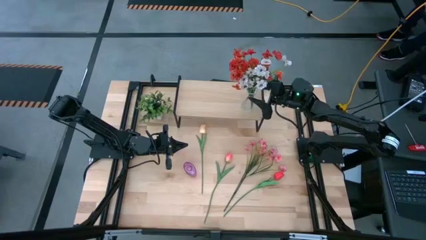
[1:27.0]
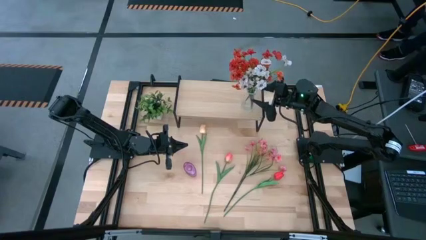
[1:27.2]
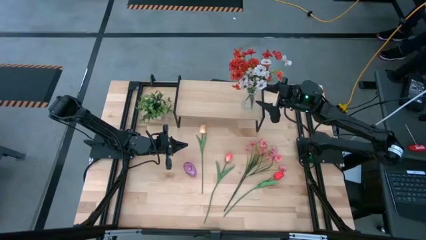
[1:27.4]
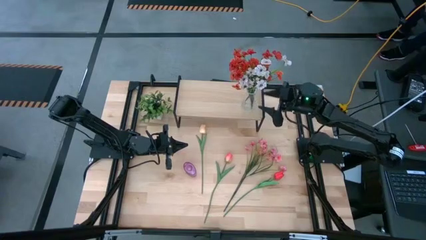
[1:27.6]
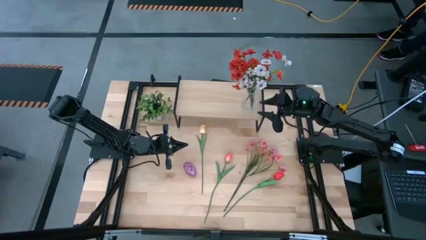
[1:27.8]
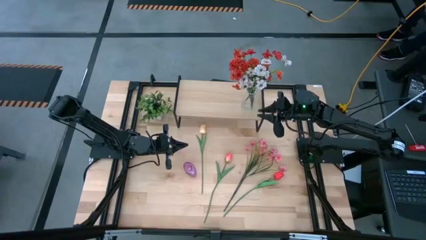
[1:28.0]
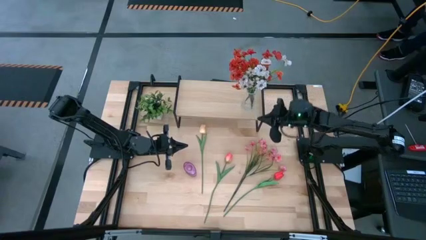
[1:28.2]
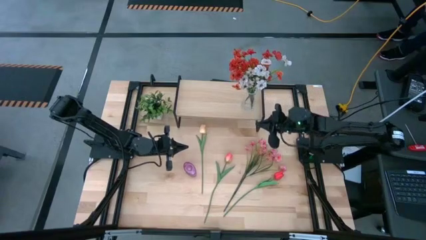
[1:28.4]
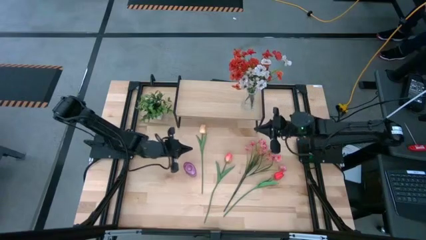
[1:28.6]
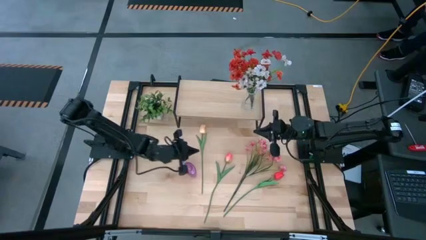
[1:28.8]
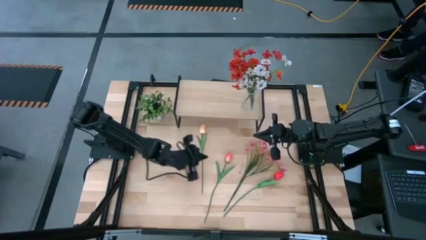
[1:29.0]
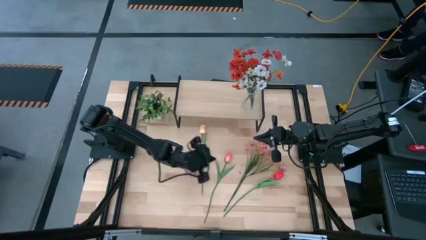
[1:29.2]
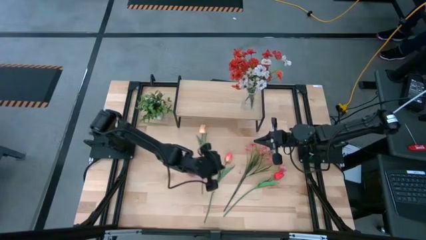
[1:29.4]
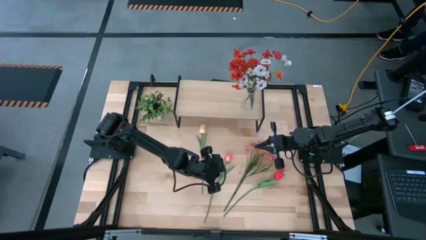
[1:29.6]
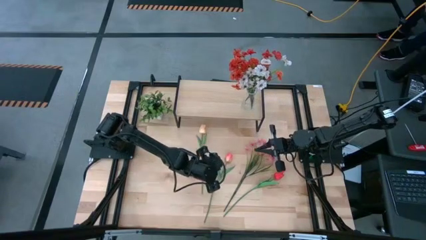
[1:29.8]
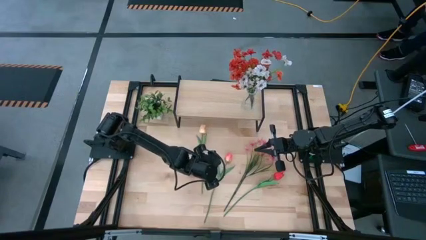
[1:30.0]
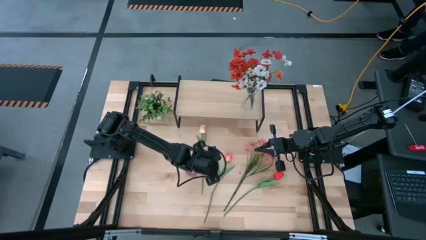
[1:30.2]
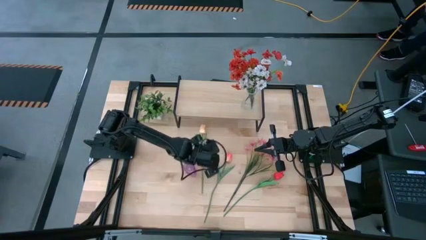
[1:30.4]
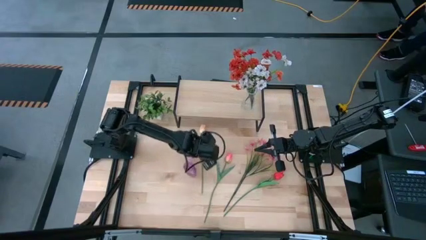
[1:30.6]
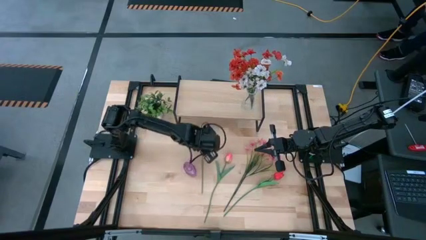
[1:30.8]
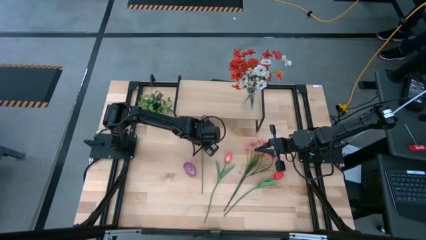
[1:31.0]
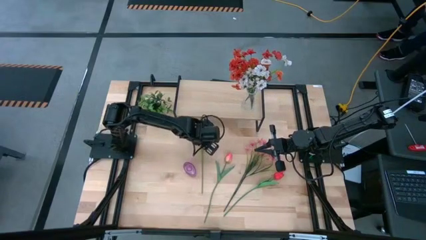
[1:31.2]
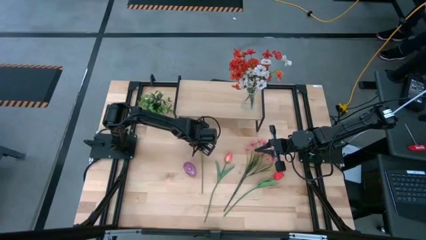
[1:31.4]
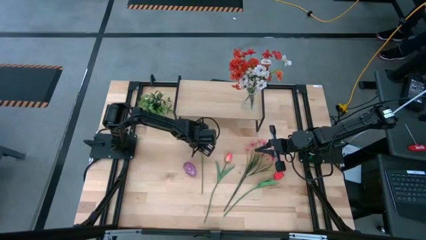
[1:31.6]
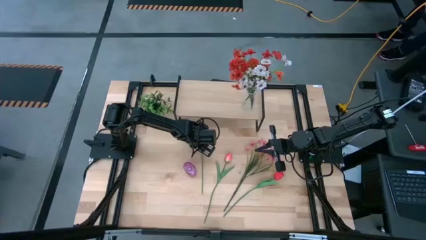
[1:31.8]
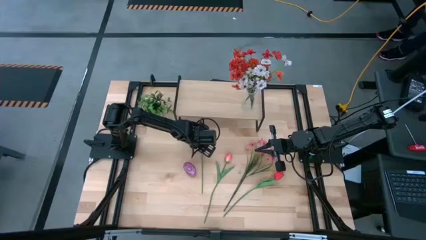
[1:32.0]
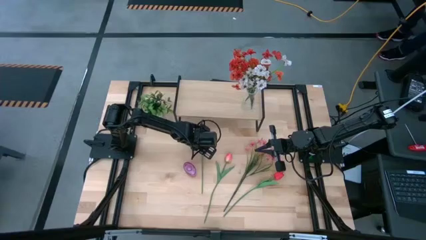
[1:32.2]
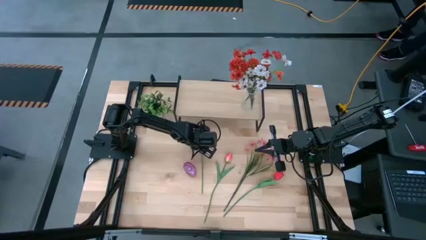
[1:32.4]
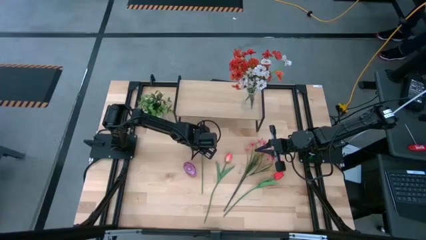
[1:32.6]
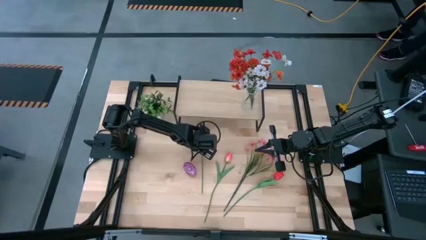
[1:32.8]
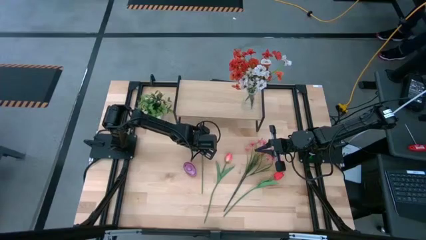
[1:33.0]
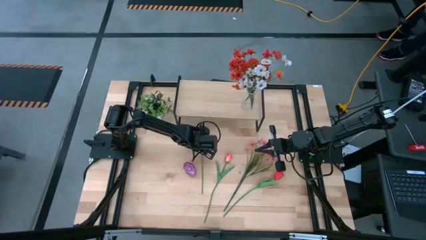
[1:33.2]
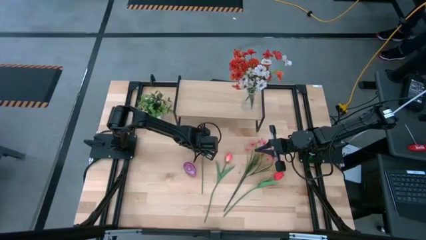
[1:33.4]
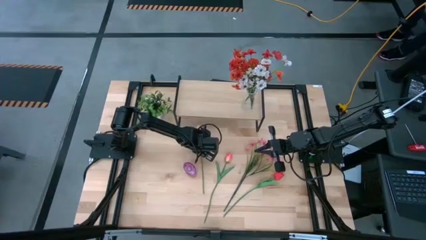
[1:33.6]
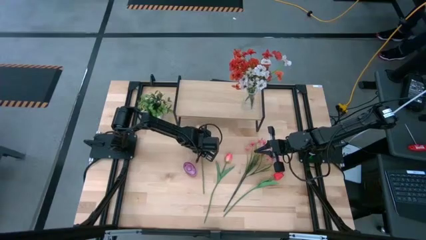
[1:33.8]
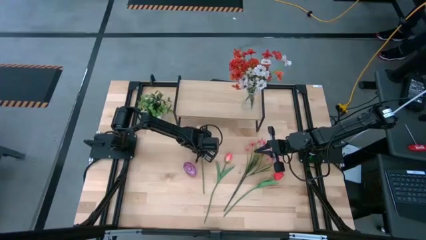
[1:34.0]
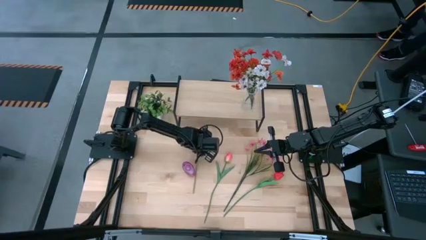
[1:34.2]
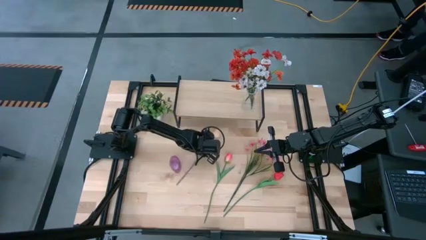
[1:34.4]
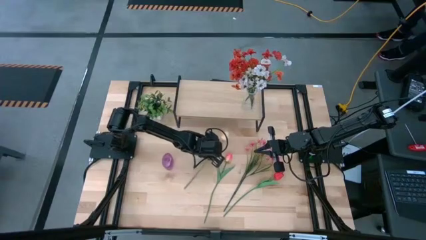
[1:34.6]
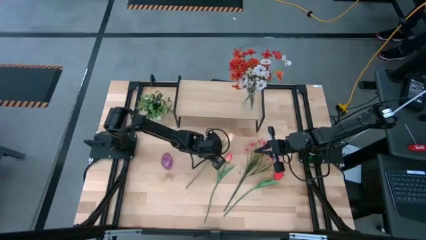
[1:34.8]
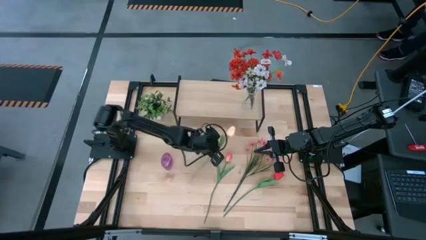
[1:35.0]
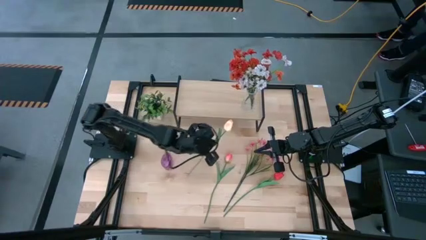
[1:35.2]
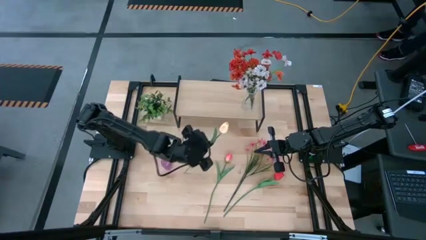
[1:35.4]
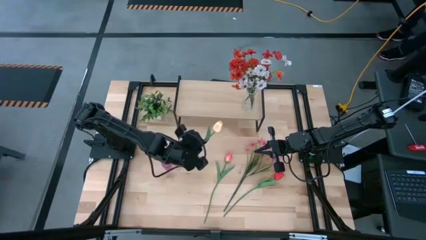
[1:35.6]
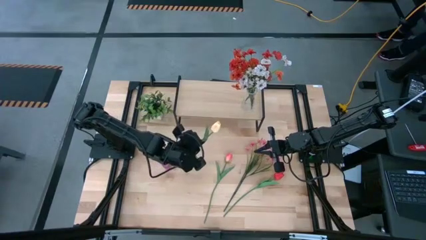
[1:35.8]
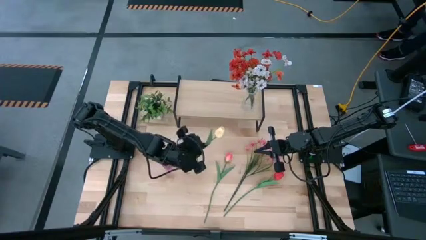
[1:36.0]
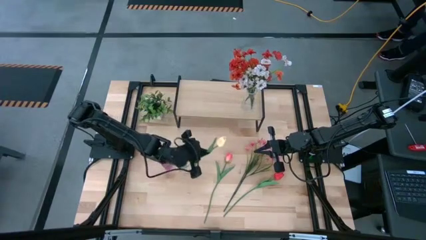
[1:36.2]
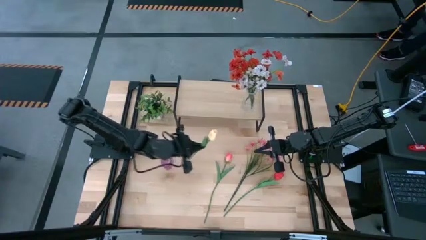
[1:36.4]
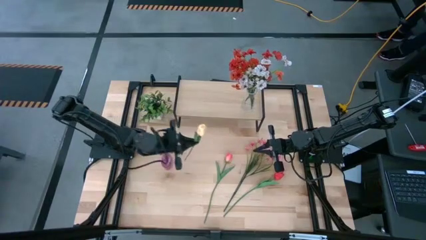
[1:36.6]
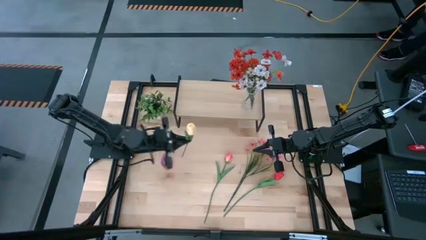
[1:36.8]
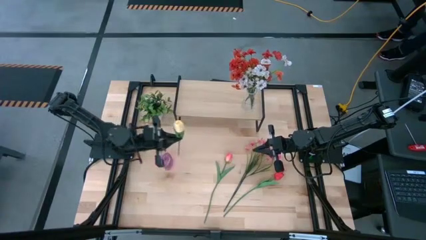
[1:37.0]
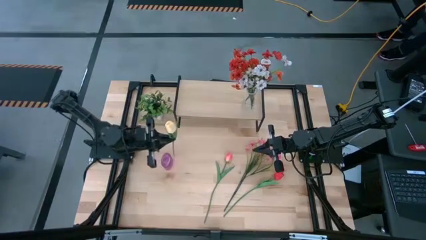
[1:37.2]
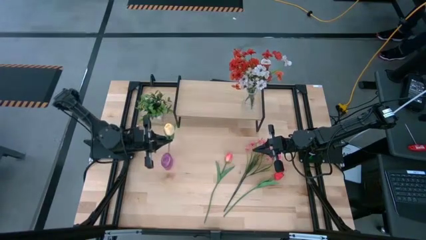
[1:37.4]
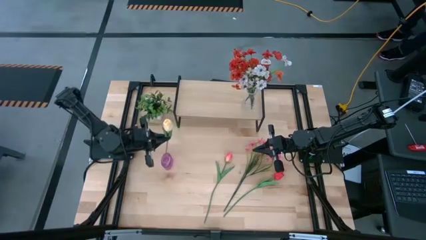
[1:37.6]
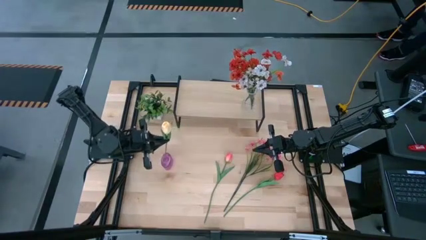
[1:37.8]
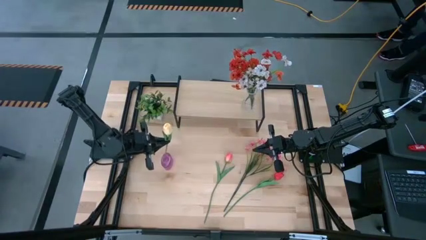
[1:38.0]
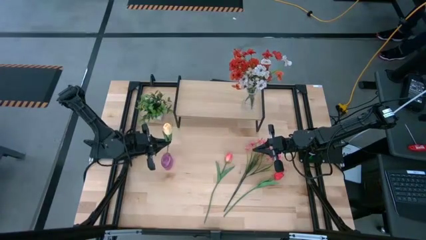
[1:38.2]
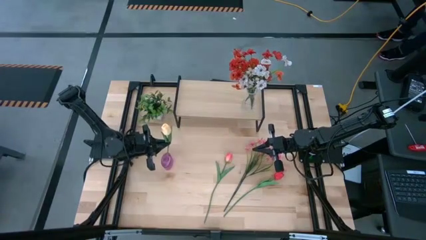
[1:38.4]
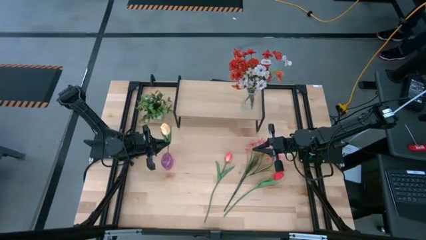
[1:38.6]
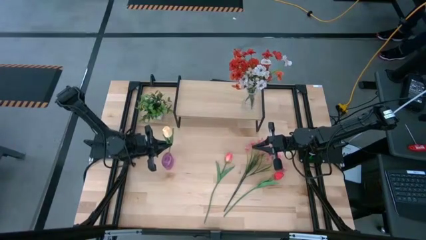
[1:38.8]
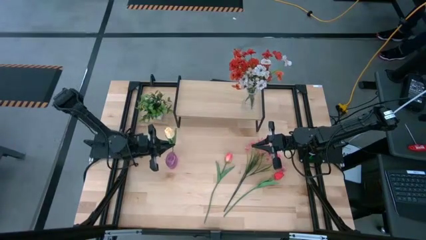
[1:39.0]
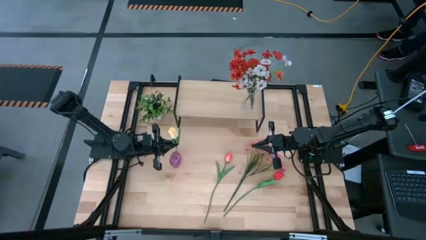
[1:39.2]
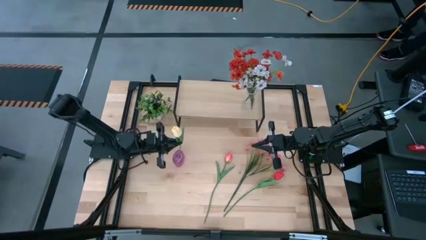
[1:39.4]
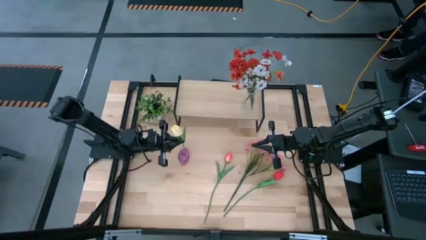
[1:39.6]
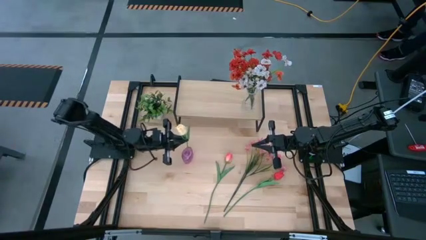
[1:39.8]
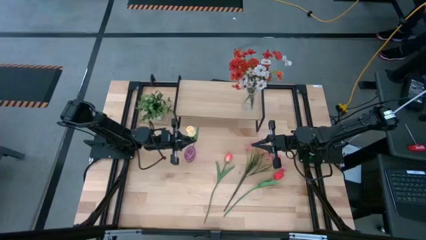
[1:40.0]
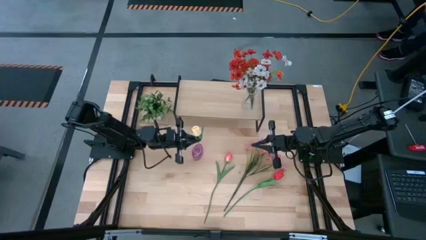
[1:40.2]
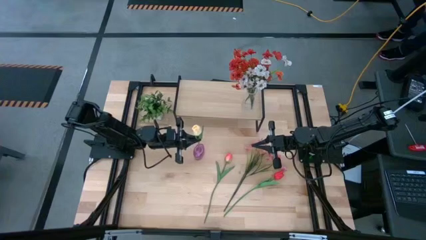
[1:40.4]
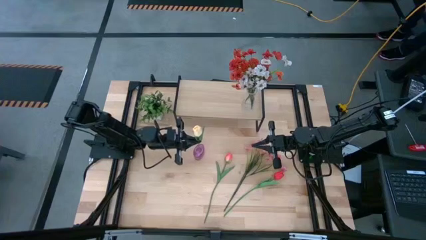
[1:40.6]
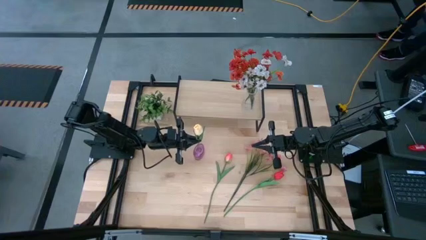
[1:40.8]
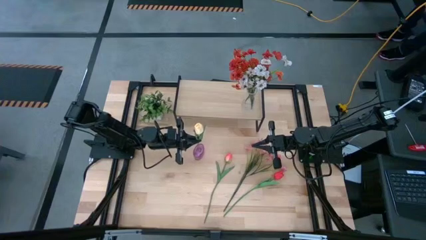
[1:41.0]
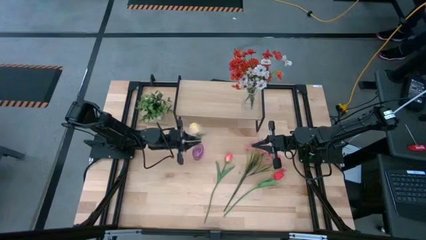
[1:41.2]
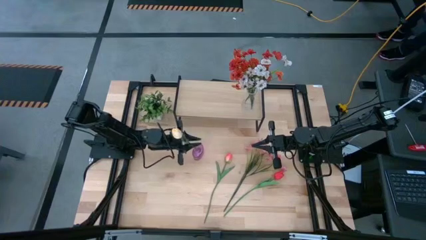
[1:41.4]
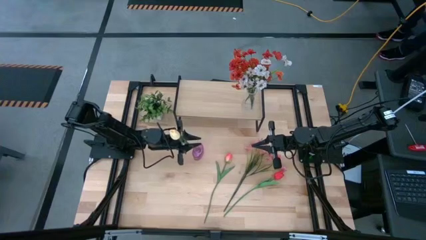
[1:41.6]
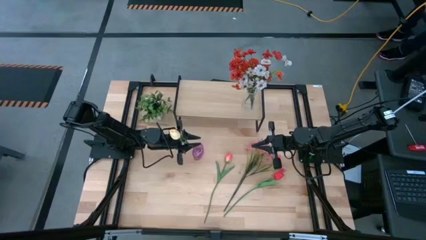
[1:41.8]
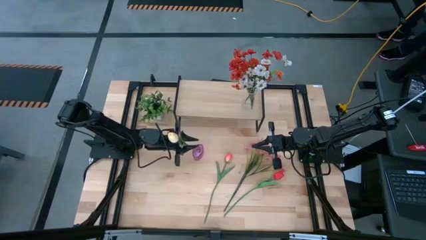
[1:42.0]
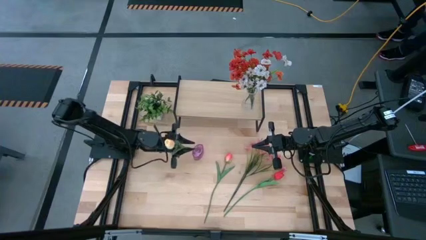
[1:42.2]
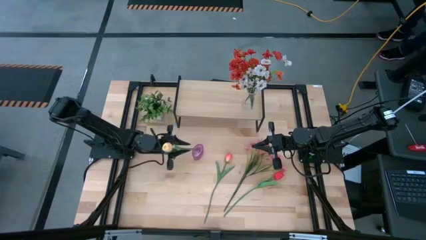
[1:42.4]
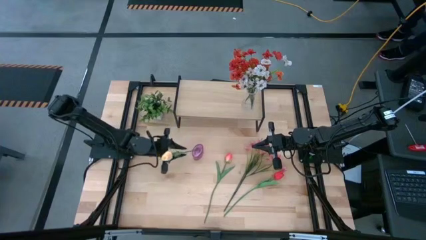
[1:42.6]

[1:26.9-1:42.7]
Task: Pick and place flowers into a vace then onto a shelf
Put the light orange flower into the purple vase
